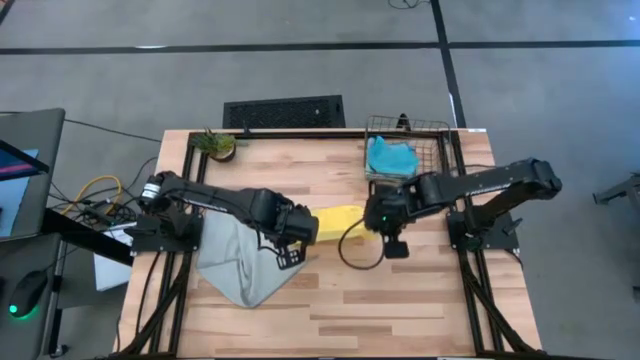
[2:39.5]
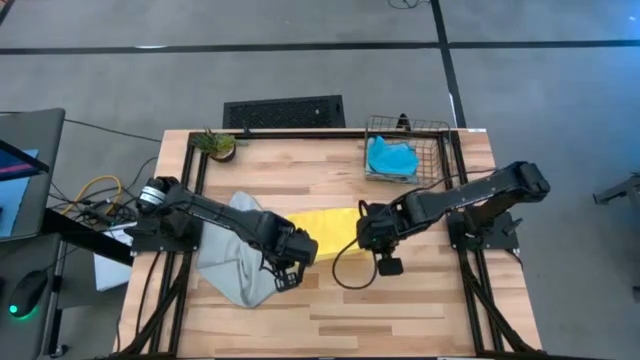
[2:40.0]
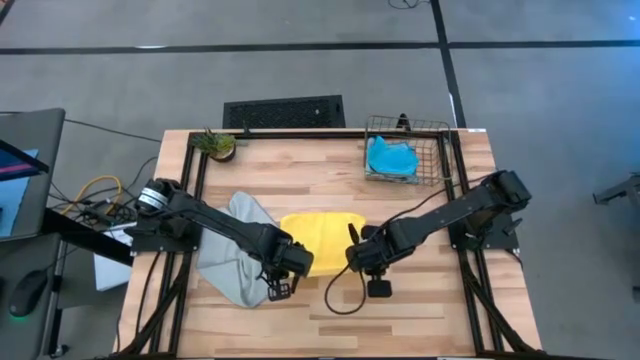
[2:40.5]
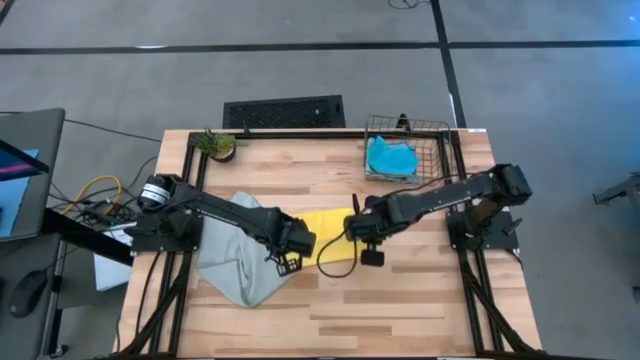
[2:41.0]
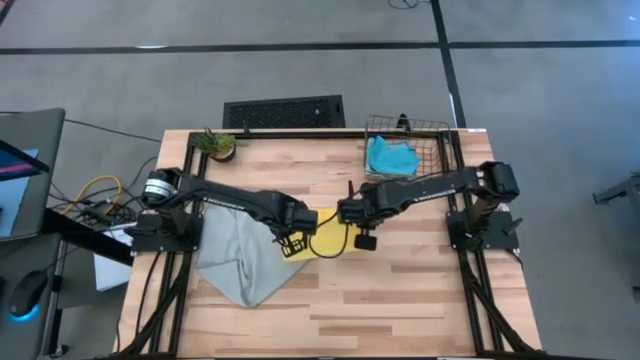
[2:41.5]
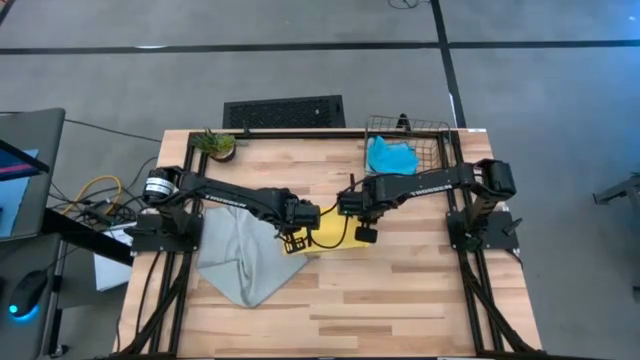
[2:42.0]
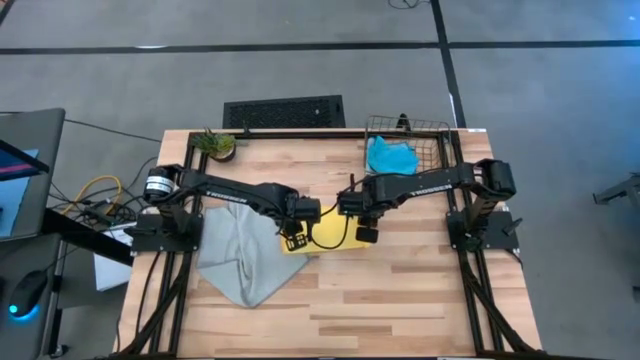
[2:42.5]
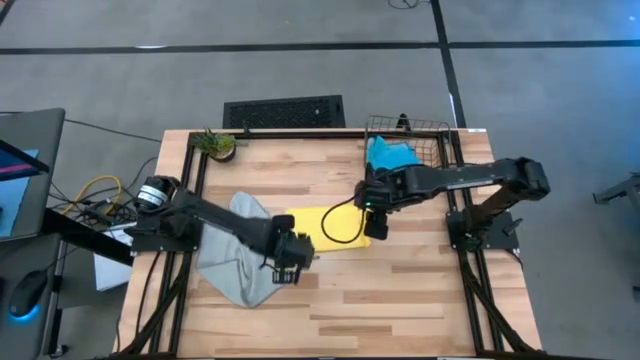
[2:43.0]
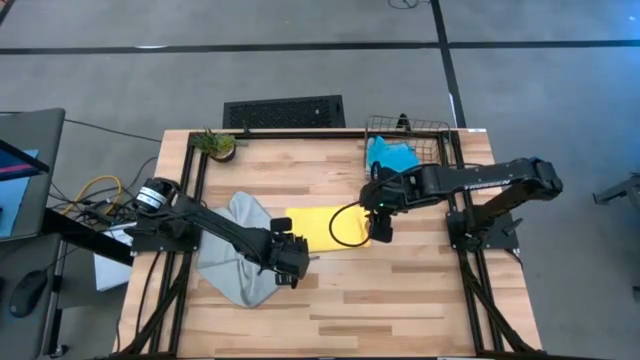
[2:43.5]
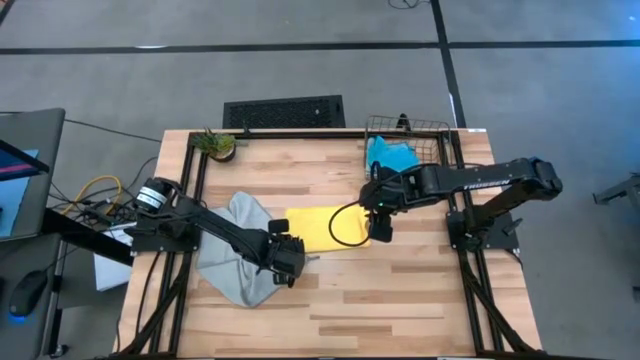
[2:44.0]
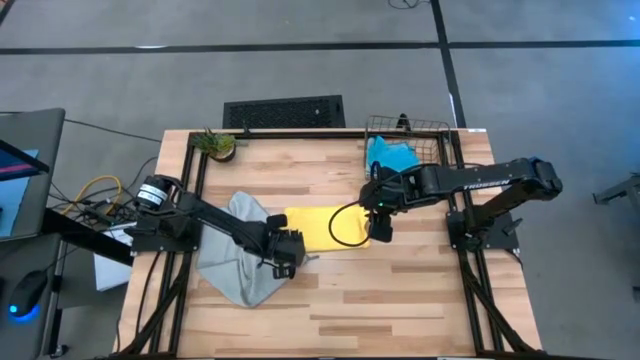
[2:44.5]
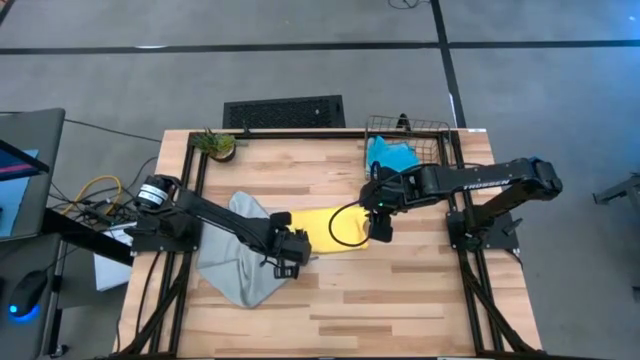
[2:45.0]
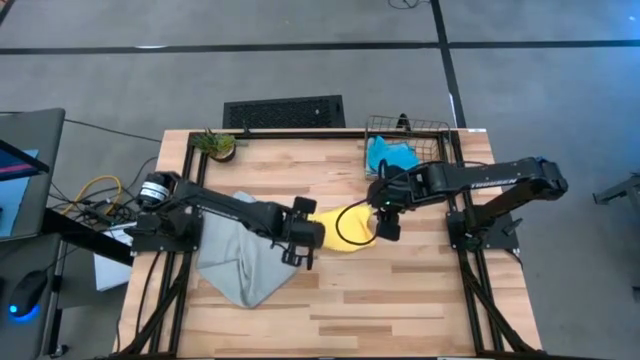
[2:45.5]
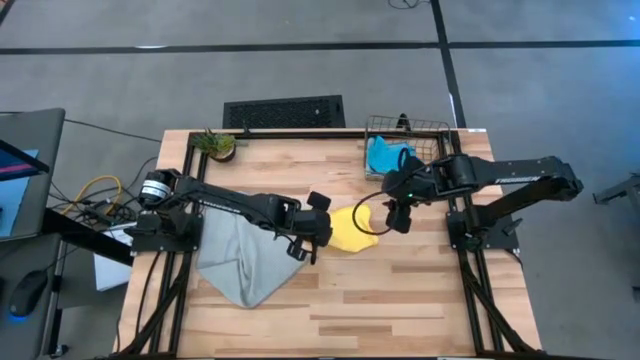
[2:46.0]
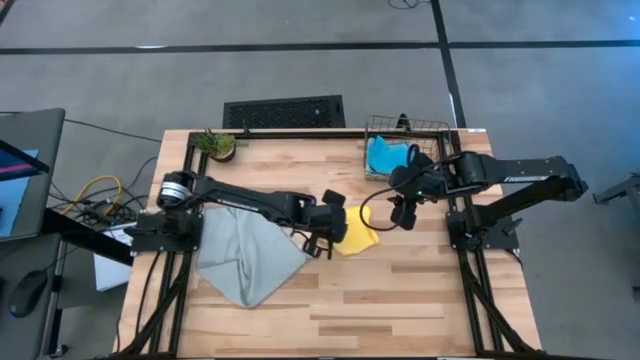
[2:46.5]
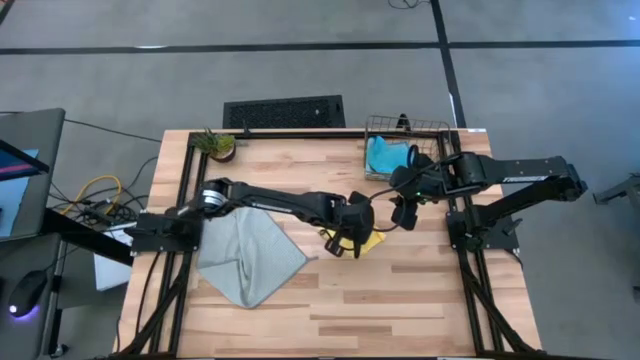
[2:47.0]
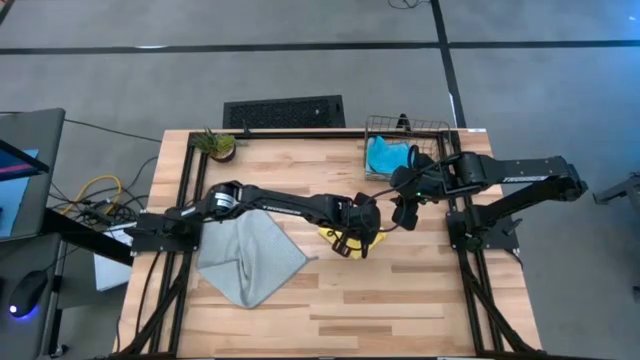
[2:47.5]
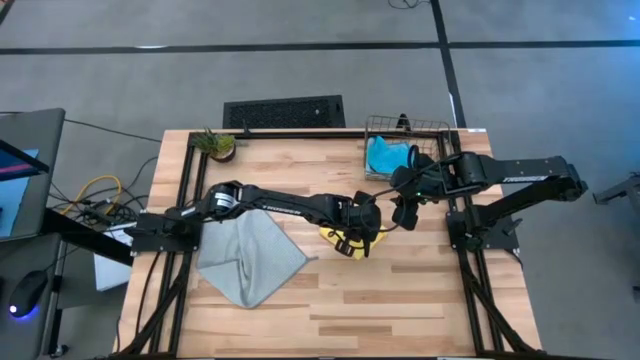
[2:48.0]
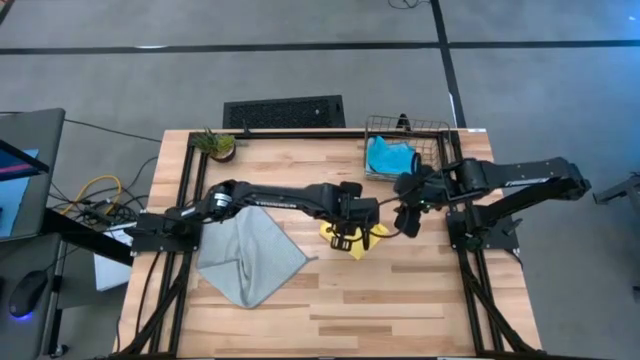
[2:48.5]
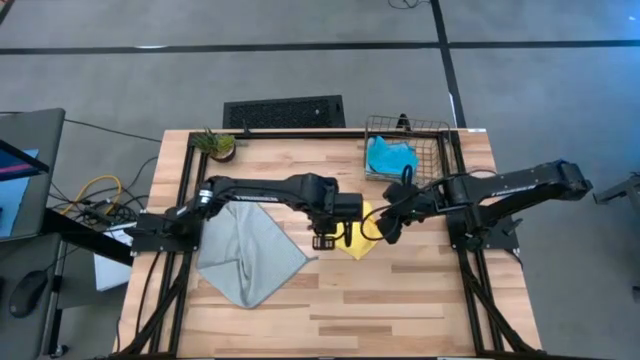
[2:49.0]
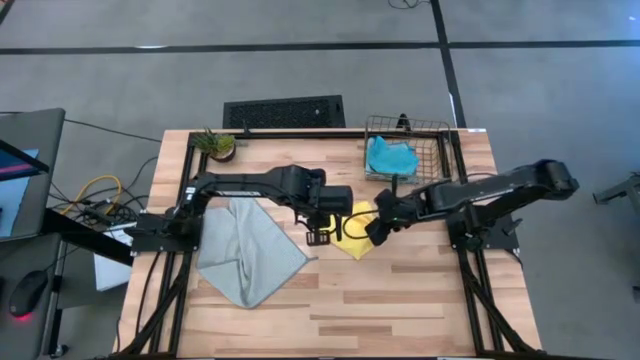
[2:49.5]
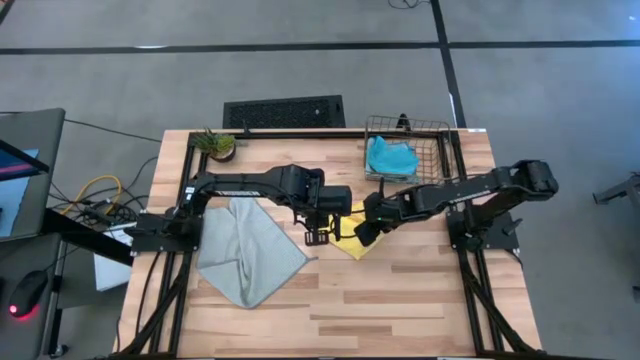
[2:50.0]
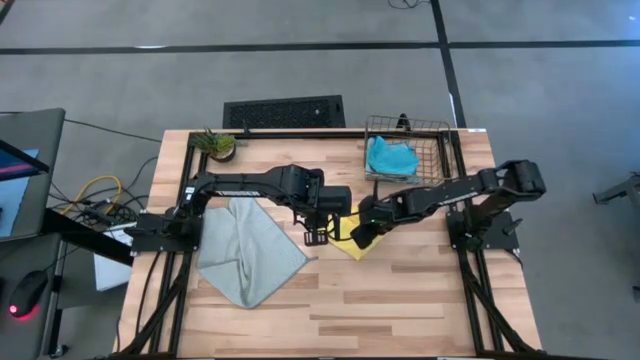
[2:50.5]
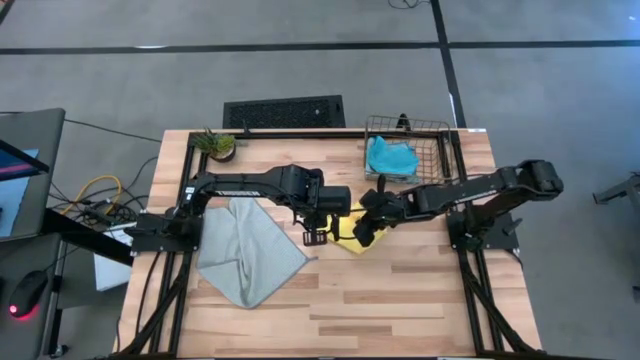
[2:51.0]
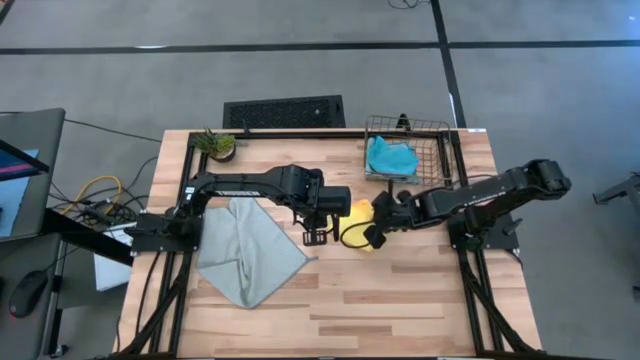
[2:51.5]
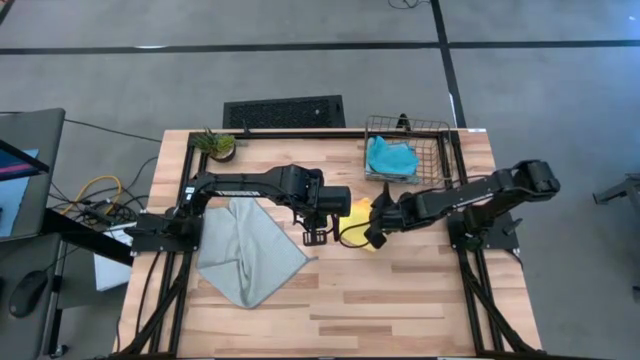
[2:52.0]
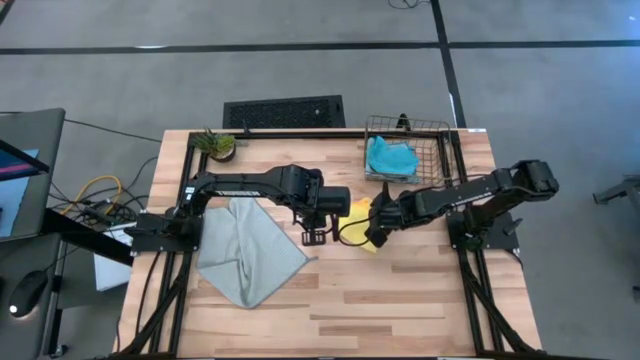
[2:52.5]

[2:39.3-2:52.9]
Task: Fold microfiber towels
Fold the yellow microfiber cloth

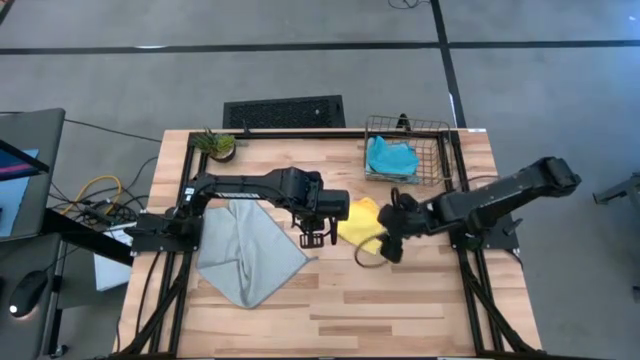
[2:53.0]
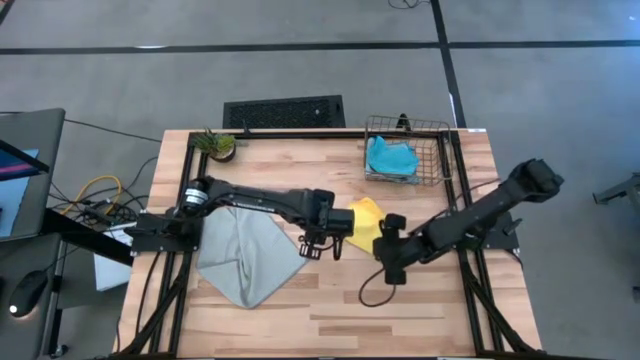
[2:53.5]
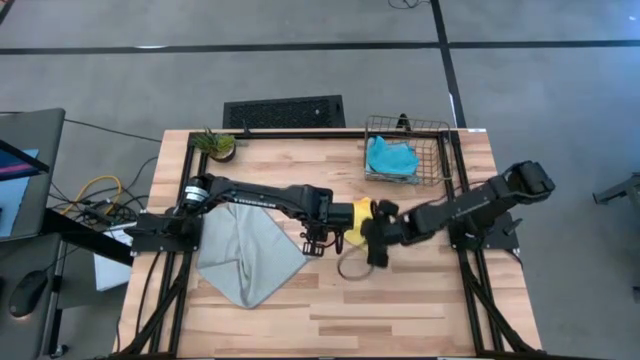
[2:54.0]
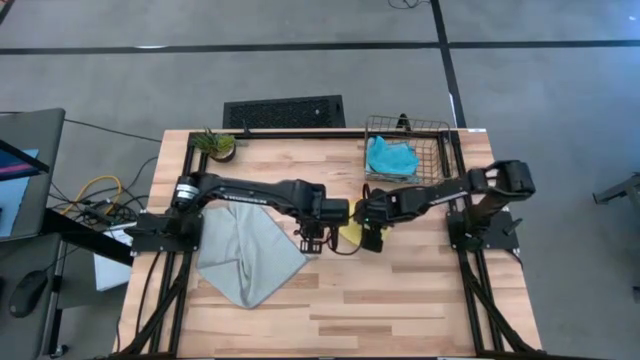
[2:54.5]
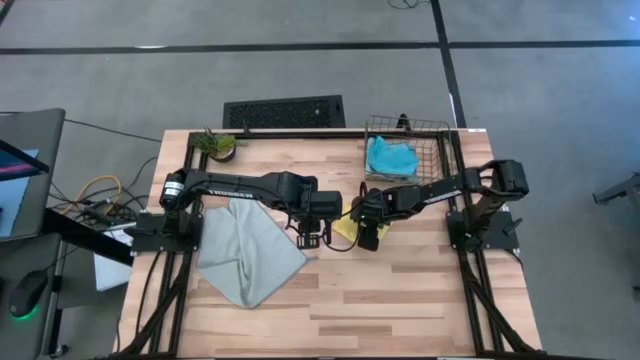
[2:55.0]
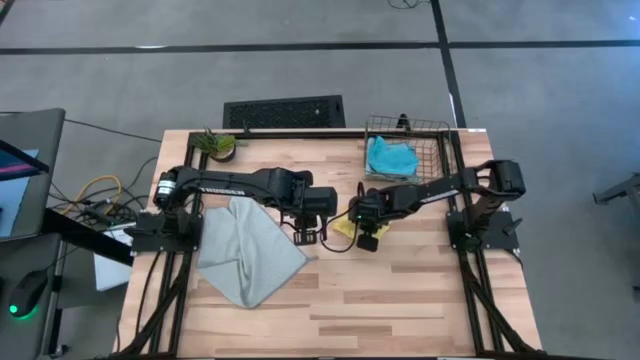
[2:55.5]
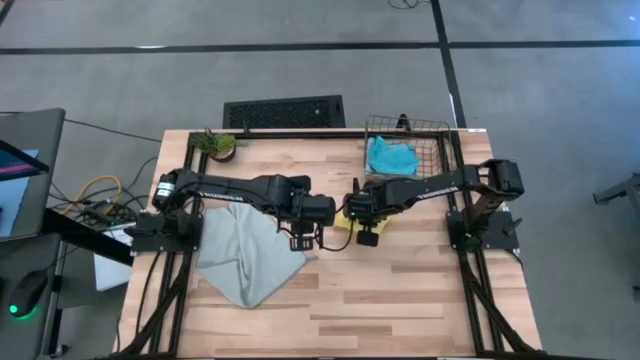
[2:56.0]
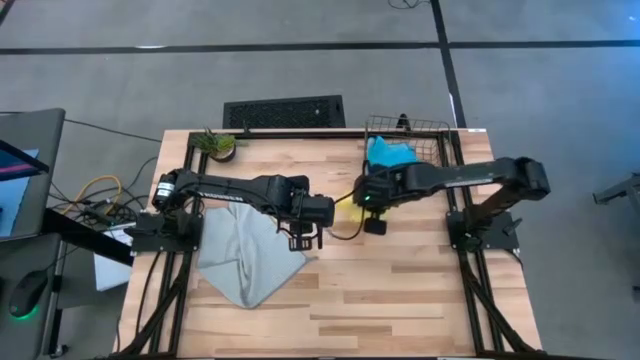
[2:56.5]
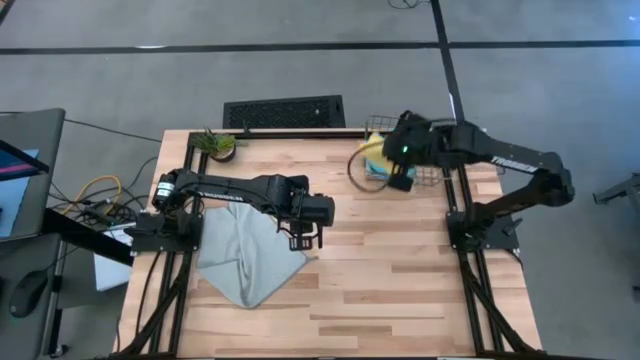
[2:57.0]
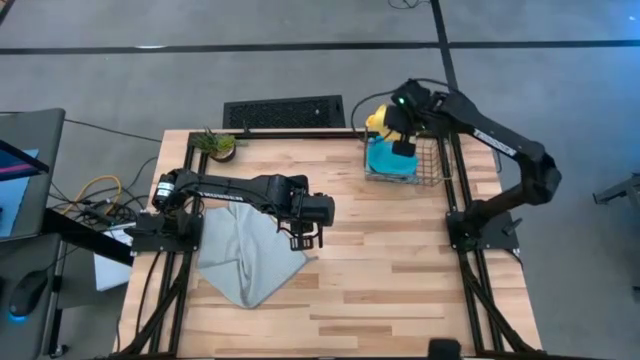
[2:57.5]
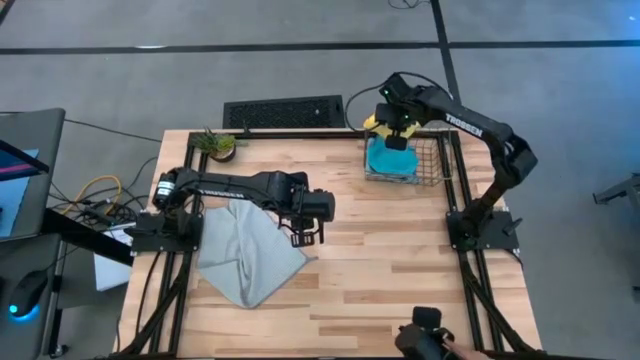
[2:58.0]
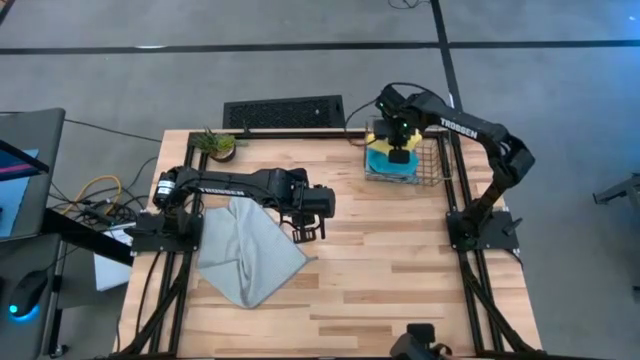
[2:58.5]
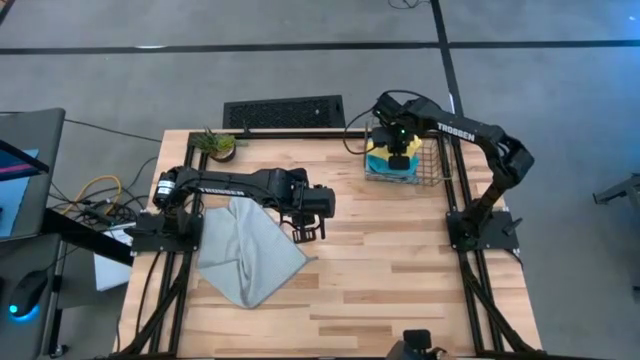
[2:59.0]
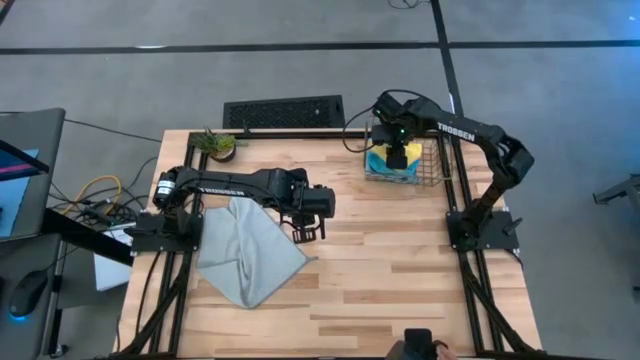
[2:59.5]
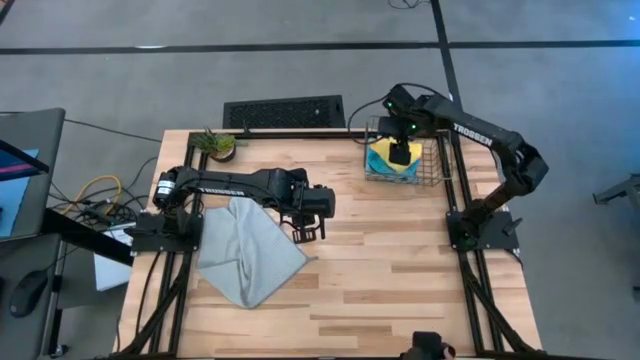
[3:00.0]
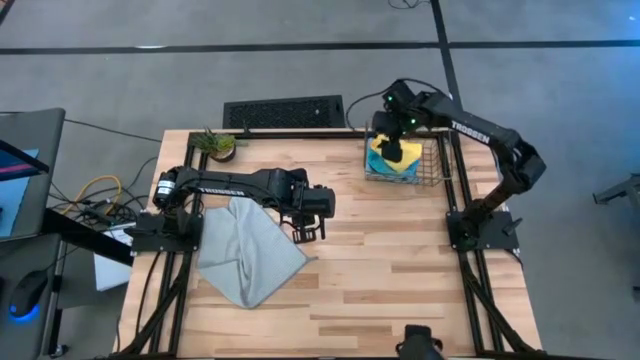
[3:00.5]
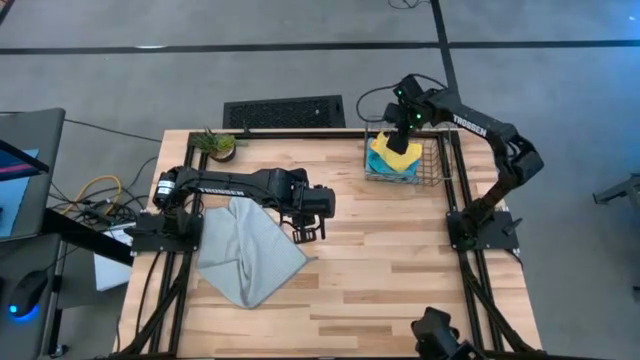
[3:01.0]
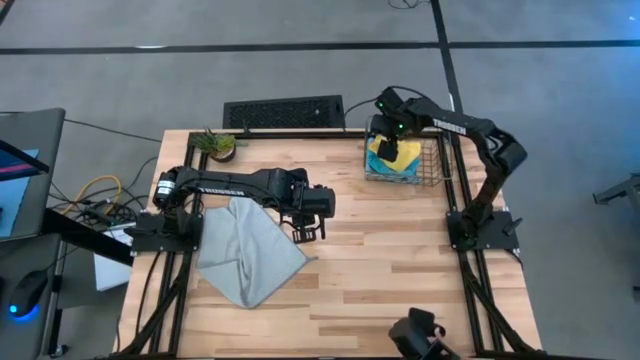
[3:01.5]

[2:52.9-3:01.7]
Put the folded yellow microfiber cloth into the wire basket
